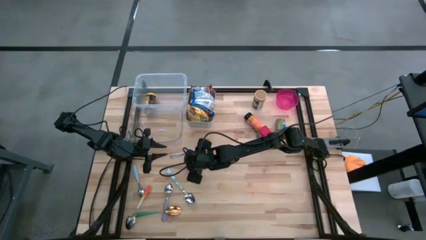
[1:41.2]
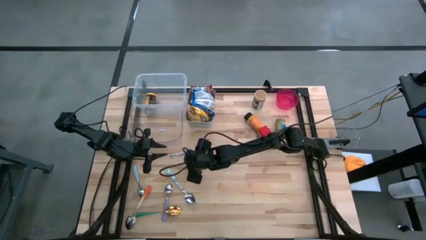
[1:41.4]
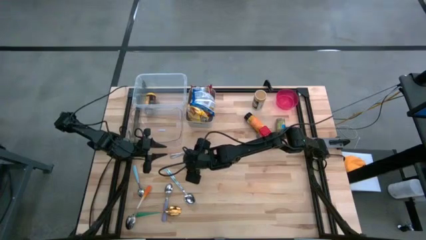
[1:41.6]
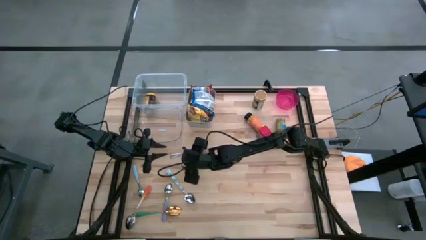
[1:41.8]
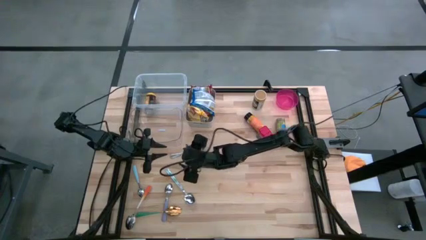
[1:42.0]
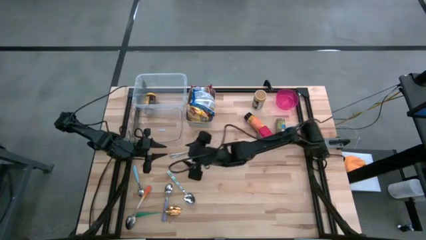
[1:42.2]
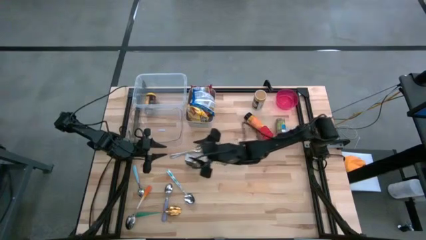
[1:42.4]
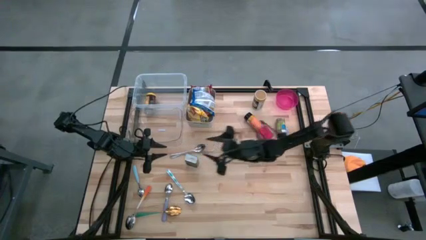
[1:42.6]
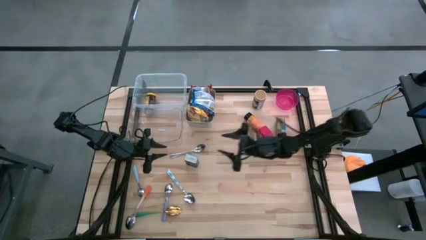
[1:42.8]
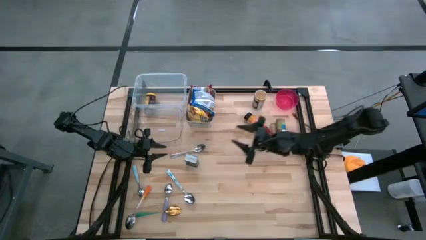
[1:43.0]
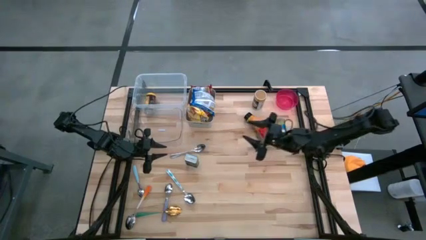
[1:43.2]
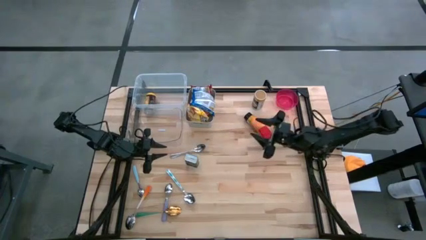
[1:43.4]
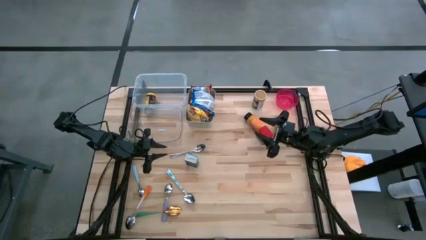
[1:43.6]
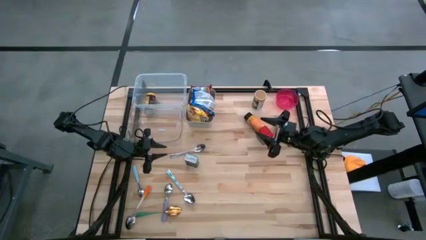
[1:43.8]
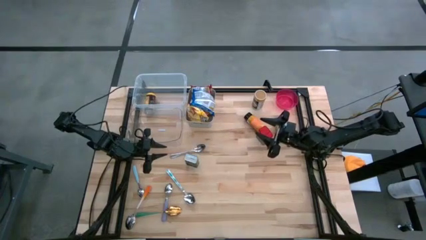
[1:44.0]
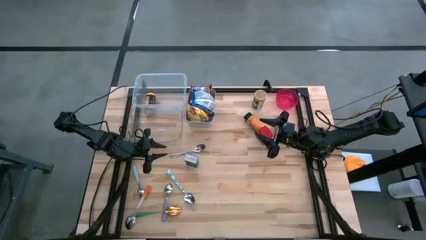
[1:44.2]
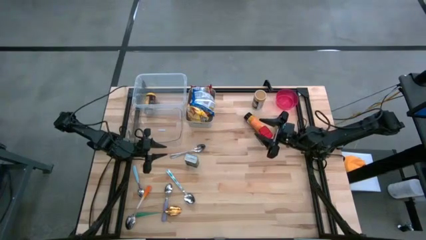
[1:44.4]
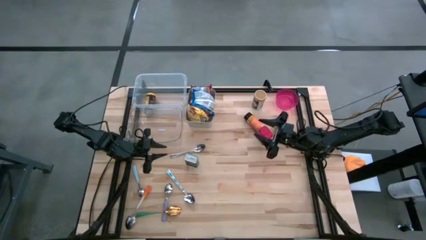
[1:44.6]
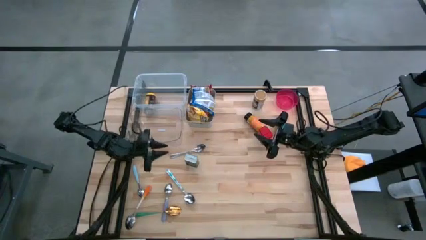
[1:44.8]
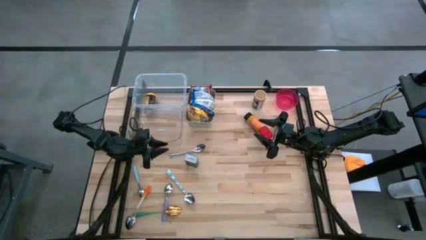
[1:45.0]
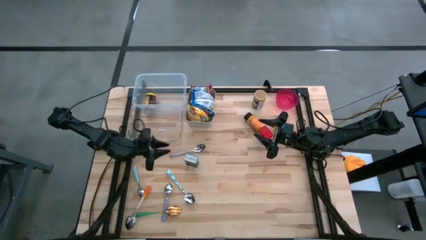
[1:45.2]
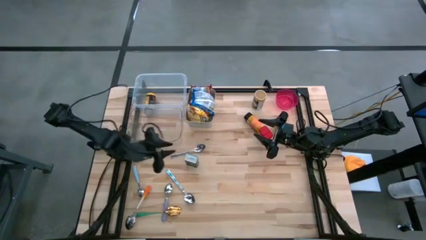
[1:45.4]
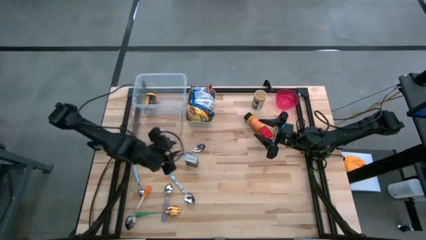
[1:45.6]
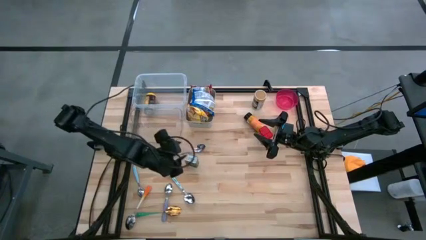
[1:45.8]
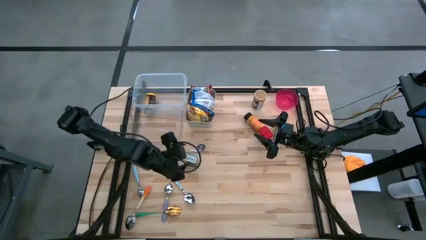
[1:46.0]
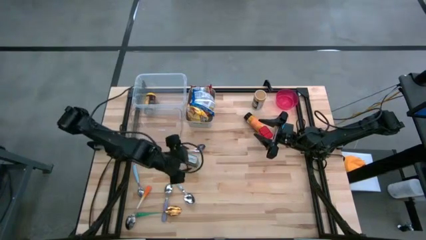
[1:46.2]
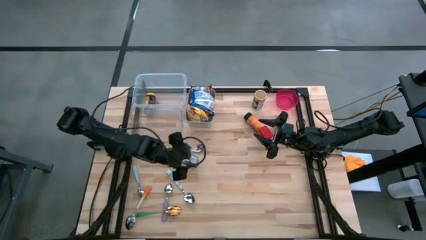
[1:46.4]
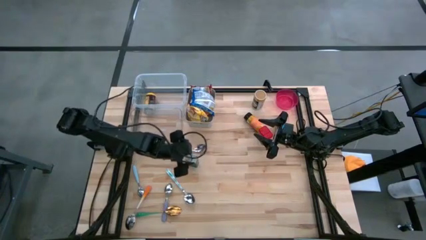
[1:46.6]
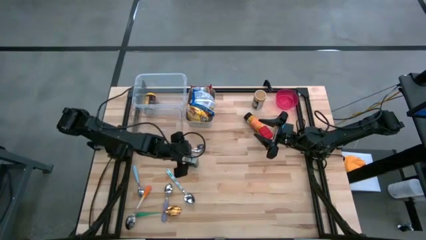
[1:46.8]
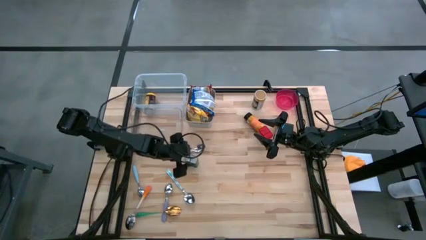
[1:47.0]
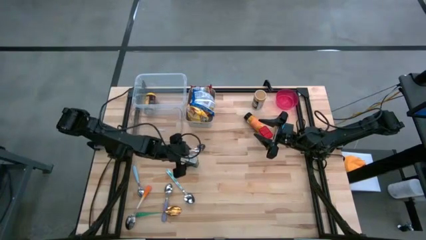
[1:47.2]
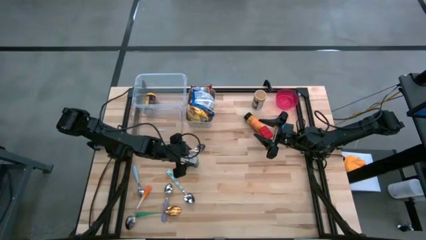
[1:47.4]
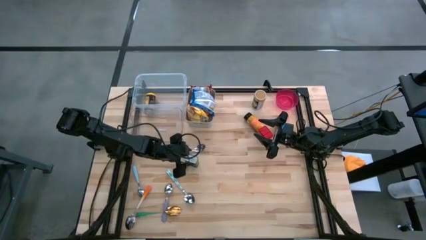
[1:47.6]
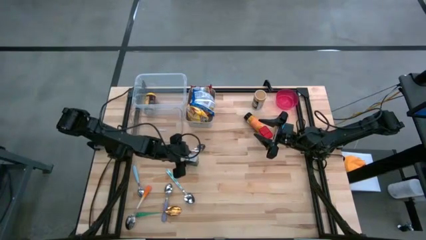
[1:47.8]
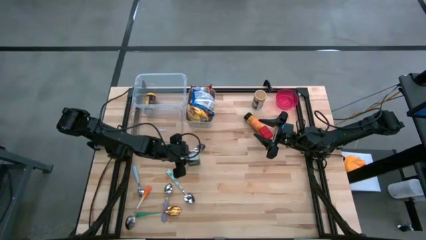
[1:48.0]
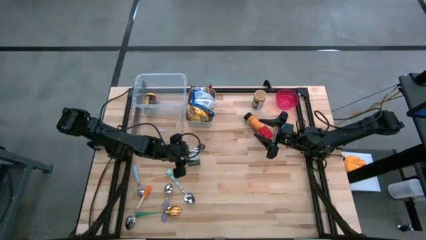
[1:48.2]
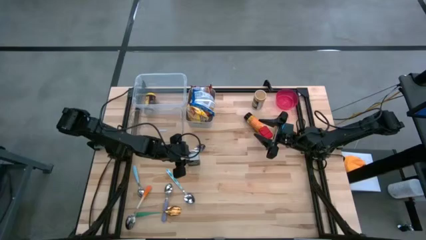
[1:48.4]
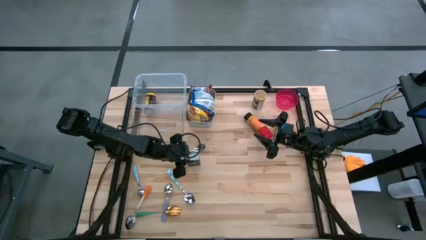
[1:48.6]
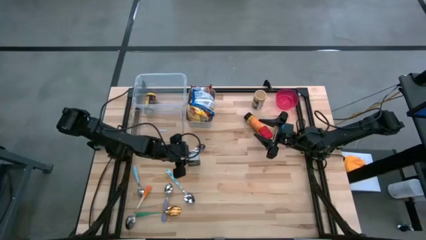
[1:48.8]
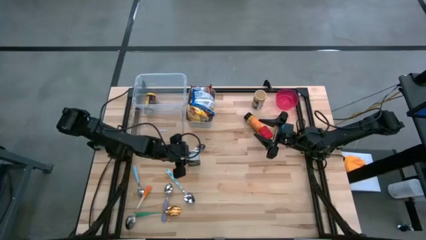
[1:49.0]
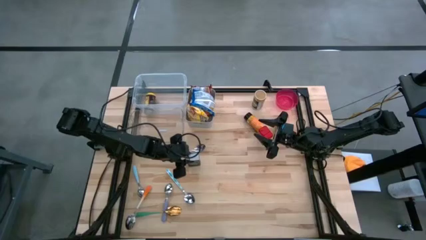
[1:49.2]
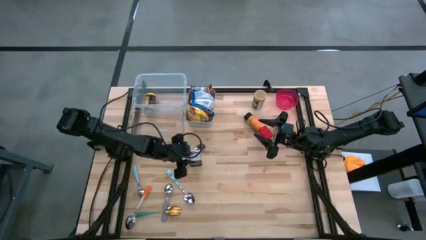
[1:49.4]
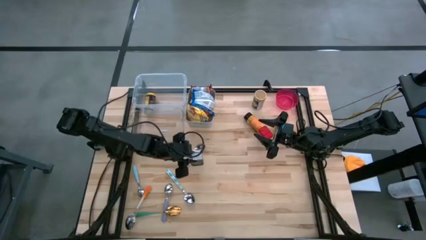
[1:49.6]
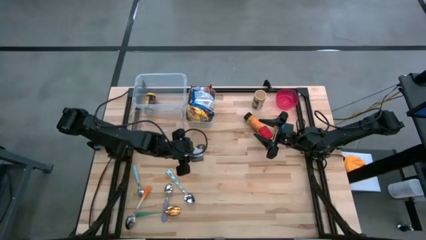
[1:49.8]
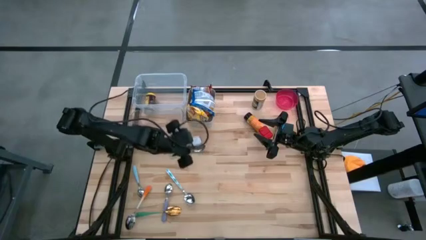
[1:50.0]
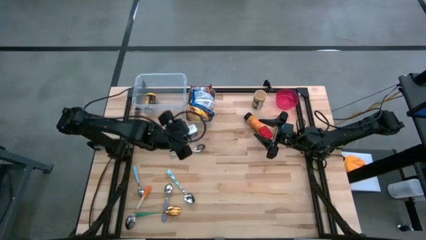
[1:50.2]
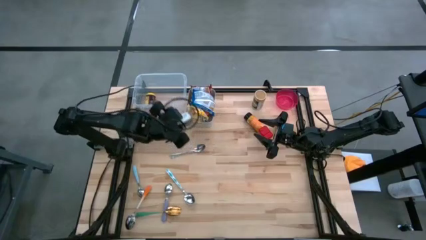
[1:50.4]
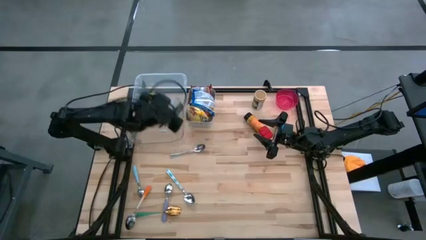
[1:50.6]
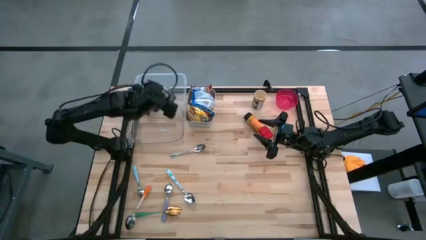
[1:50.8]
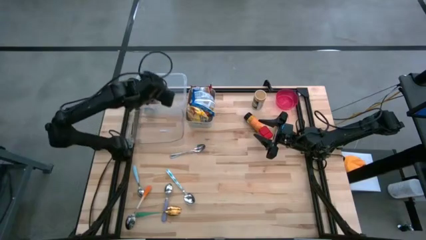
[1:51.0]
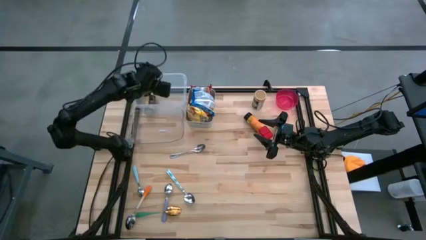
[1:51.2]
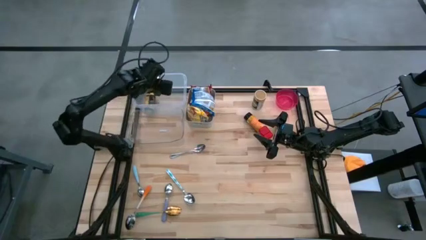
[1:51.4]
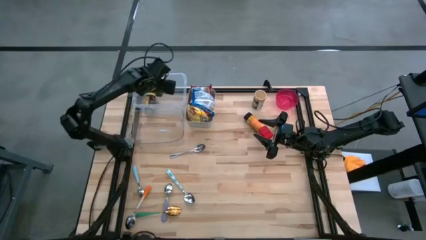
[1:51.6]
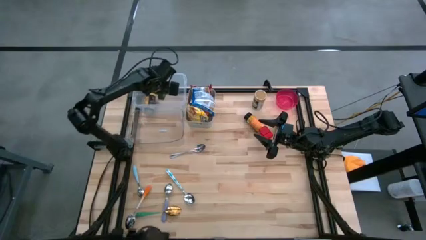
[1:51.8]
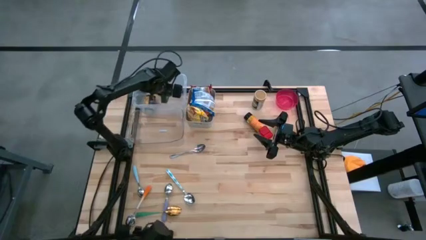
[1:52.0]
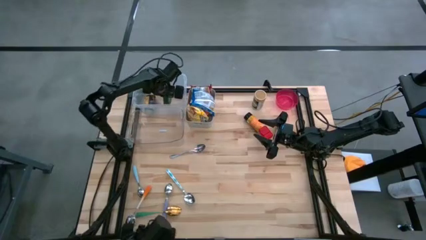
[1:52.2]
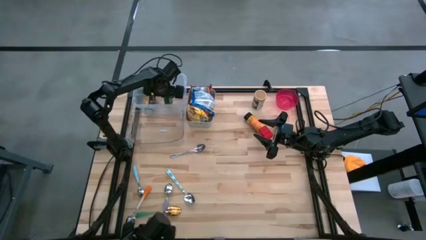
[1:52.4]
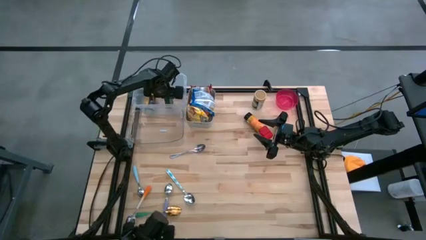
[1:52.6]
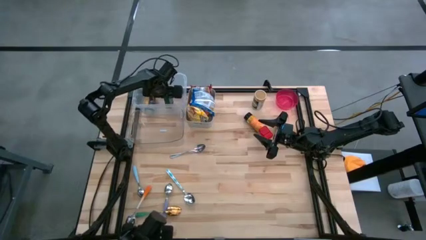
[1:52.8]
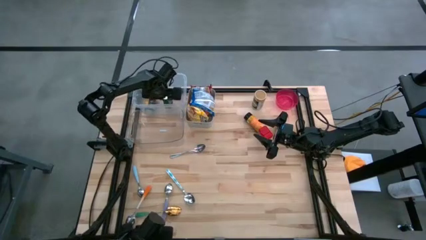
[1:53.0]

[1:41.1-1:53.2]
Put the black seasoning can into the white bin

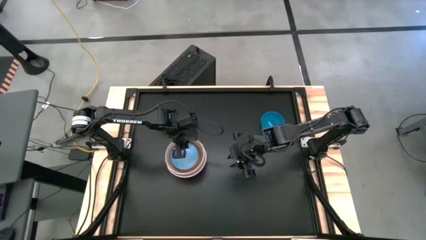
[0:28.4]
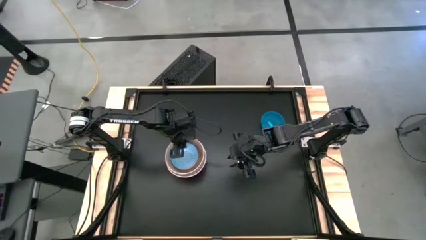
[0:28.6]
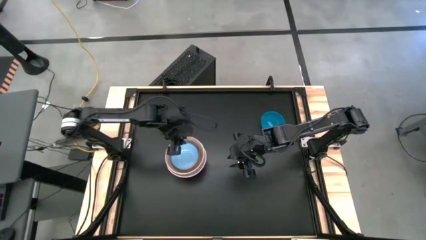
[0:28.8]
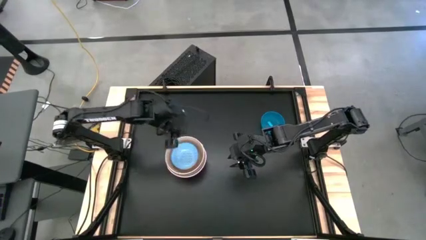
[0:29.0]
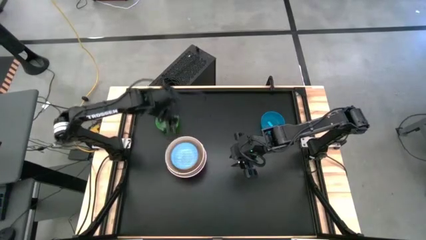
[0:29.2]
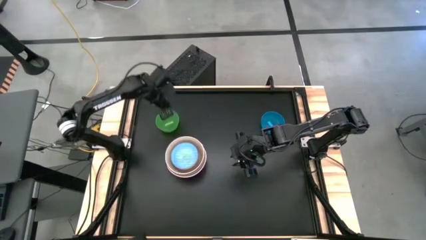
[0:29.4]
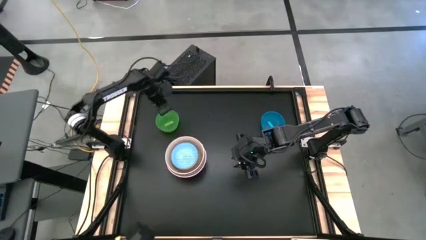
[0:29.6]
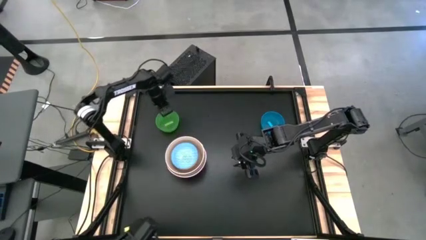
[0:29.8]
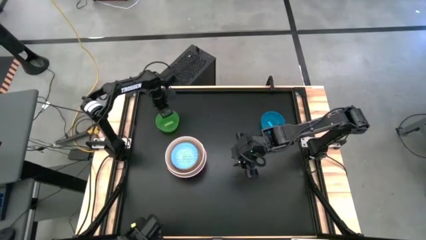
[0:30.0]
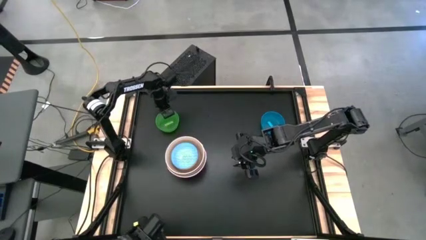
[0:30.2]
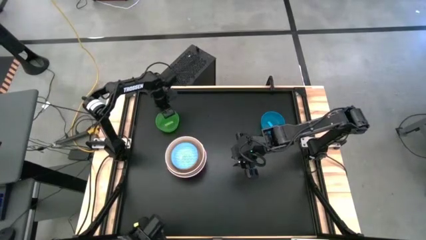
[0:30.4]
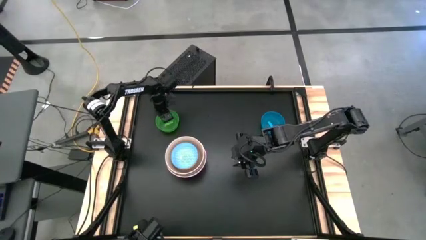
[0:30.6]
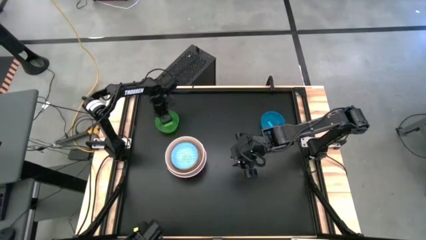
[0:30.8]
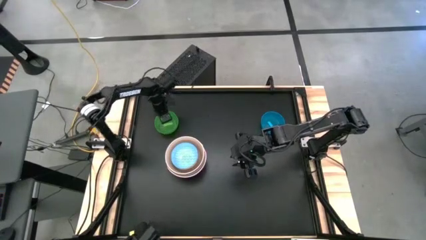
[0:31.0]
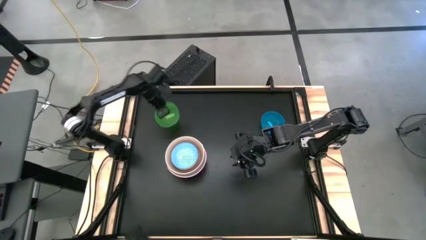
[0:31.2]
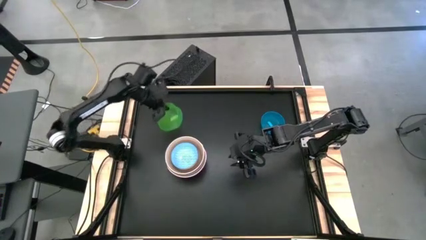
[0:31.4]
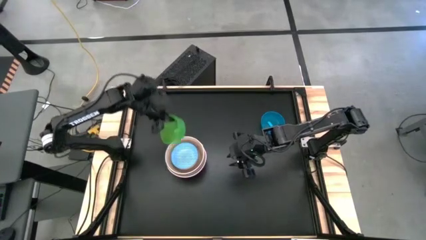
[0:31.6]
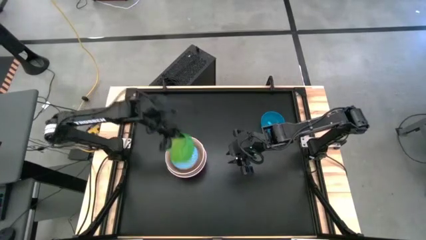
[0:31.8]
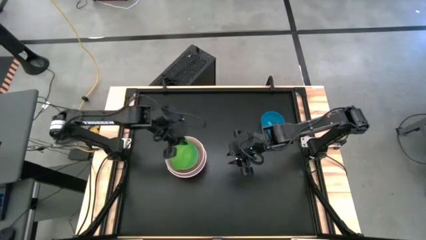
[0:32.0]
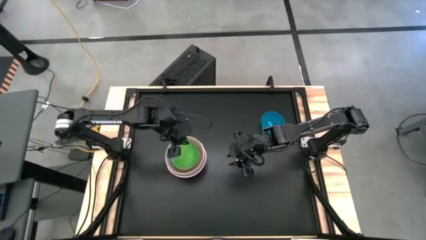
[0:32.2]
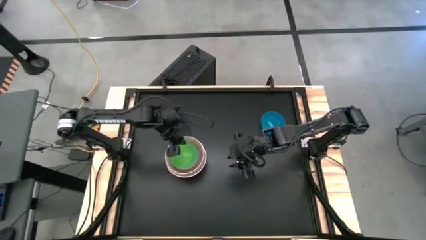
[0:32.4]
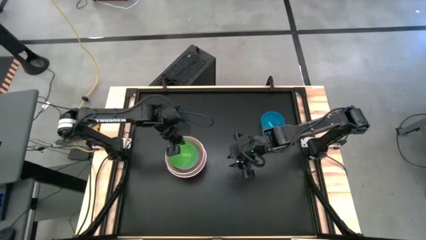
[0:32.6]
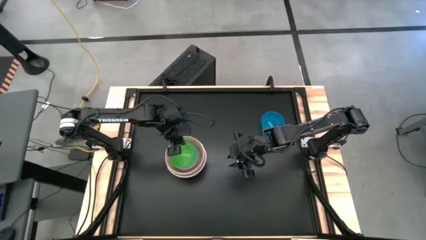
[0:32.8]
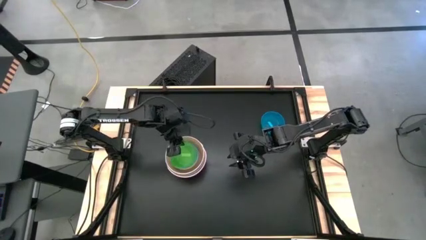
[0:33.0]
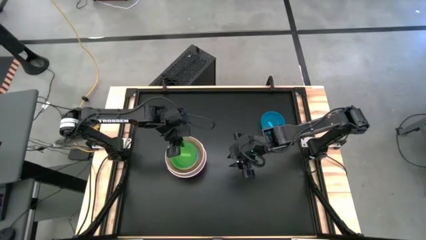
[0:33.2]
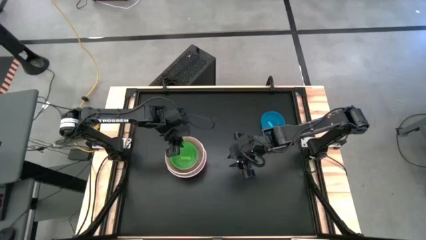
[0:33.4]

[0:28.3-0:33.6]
Stack the green bowl on top of the blue pattern bowl
